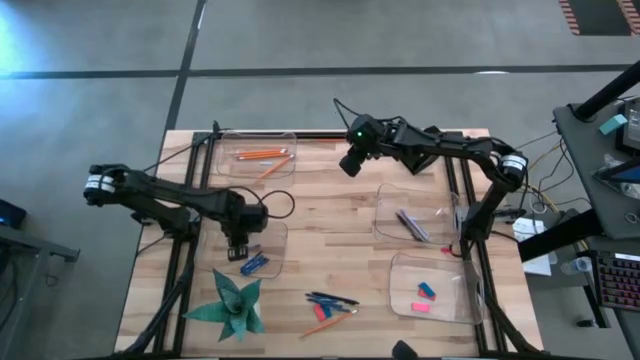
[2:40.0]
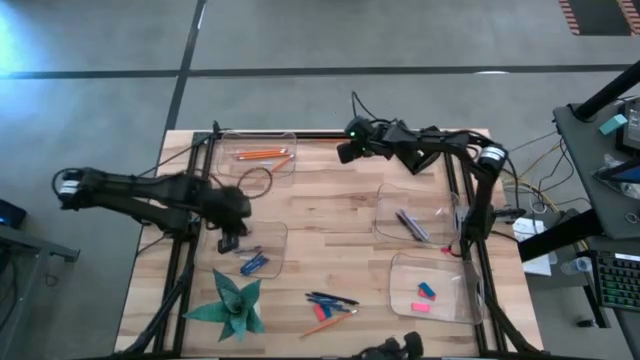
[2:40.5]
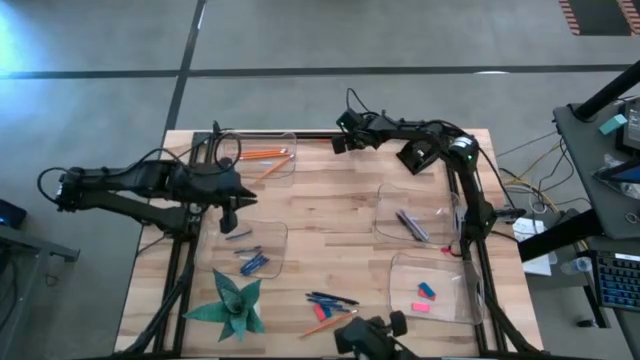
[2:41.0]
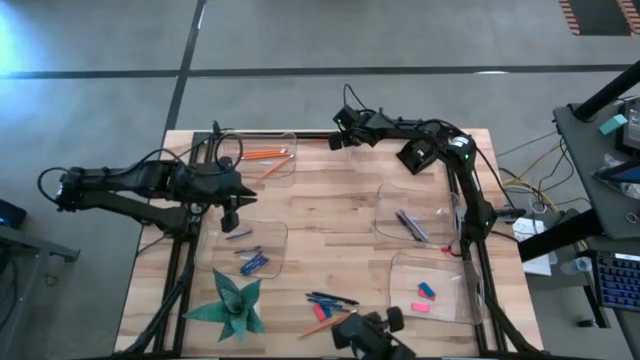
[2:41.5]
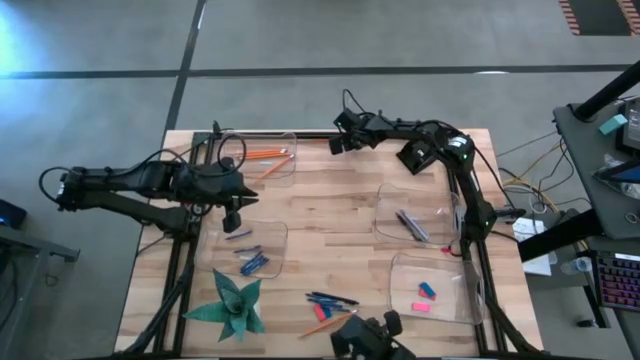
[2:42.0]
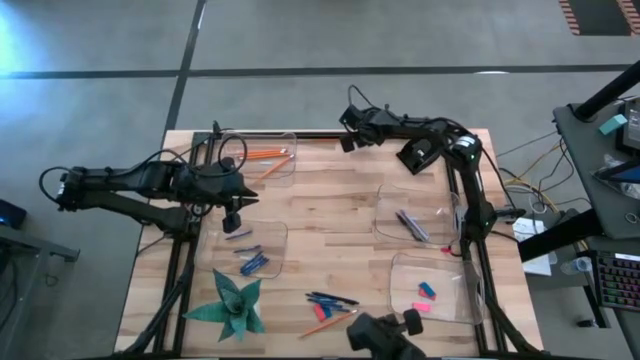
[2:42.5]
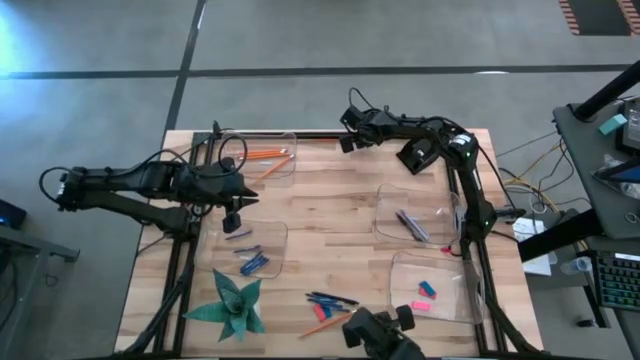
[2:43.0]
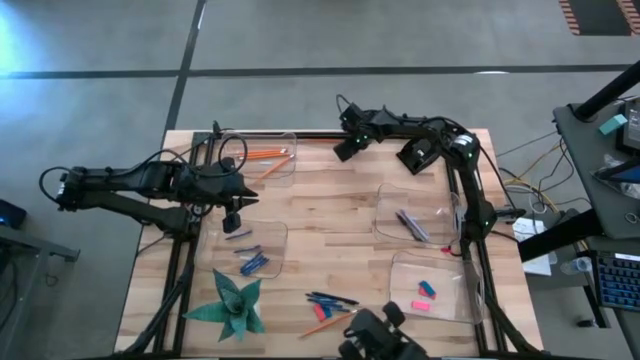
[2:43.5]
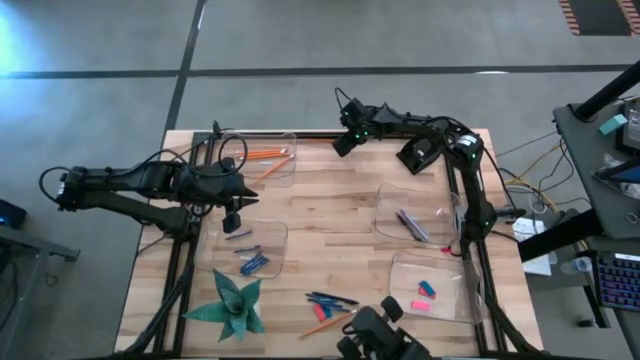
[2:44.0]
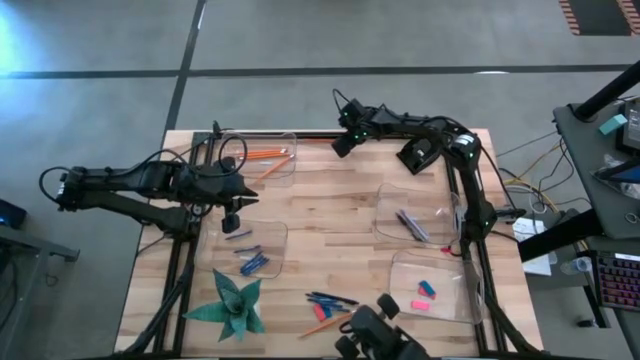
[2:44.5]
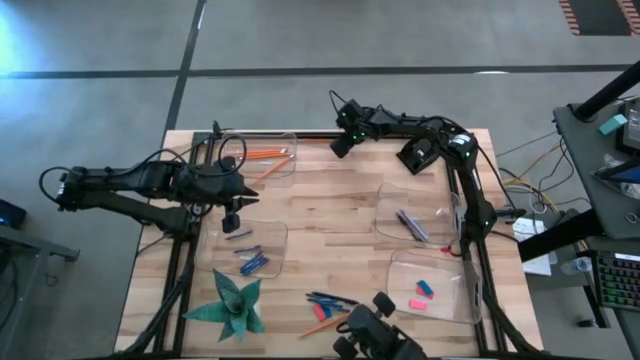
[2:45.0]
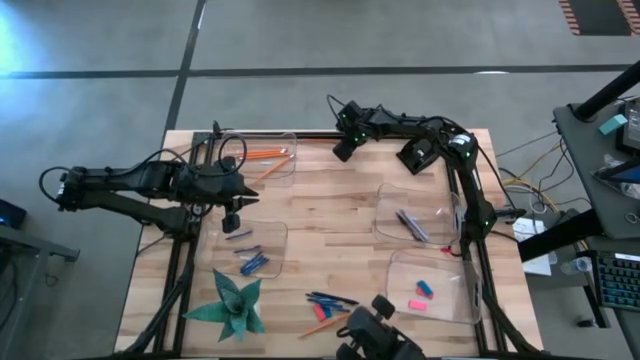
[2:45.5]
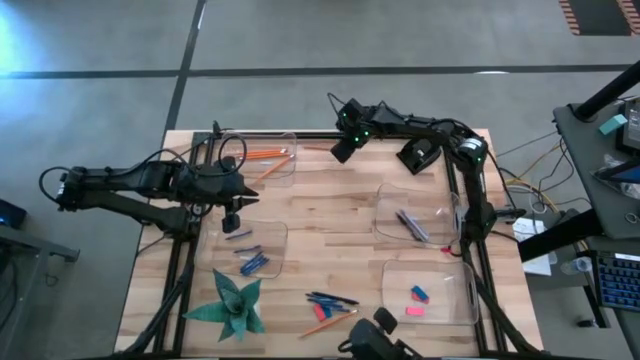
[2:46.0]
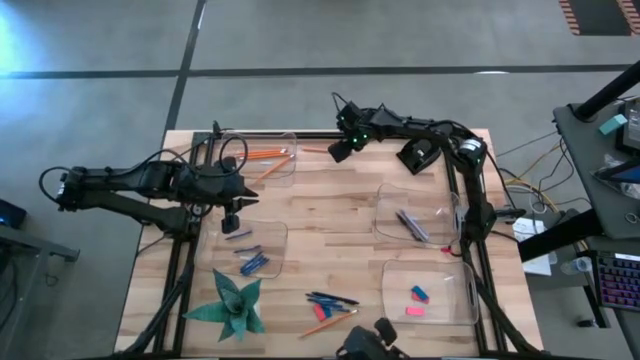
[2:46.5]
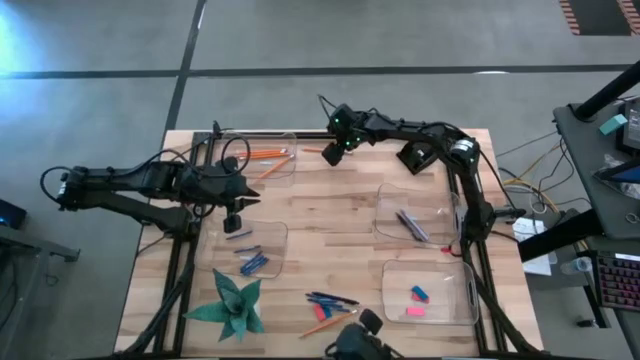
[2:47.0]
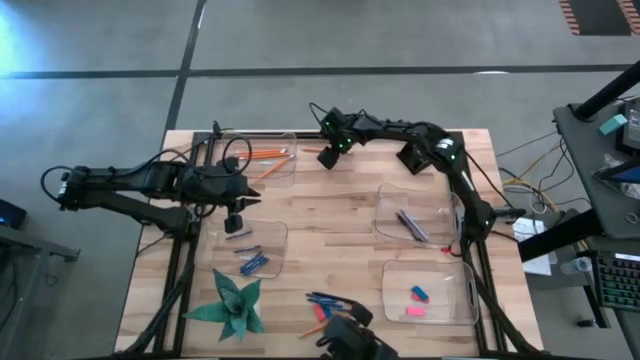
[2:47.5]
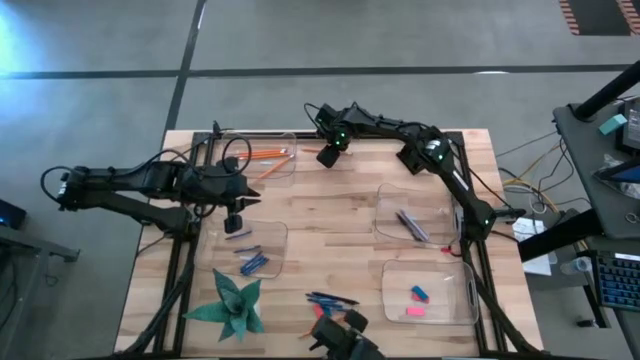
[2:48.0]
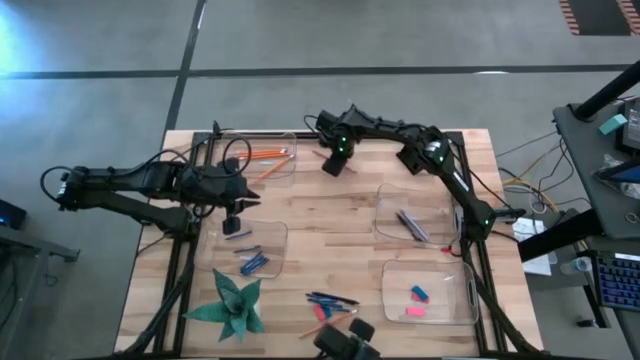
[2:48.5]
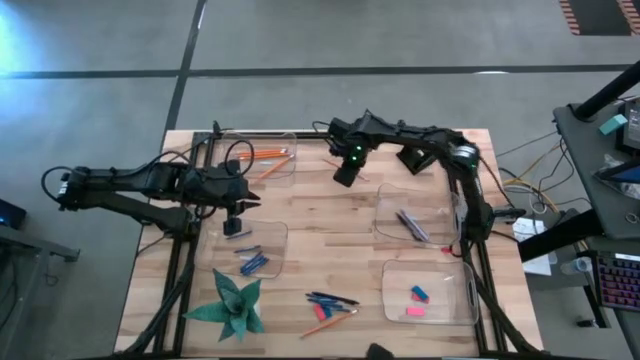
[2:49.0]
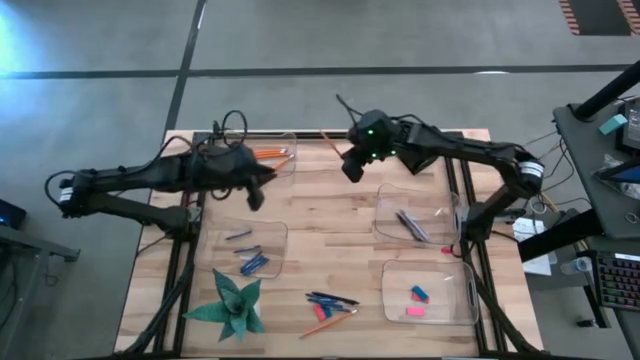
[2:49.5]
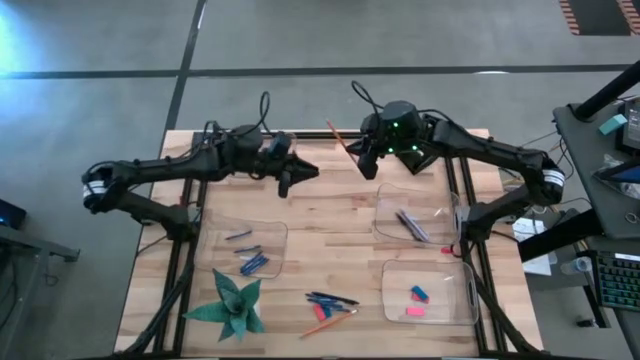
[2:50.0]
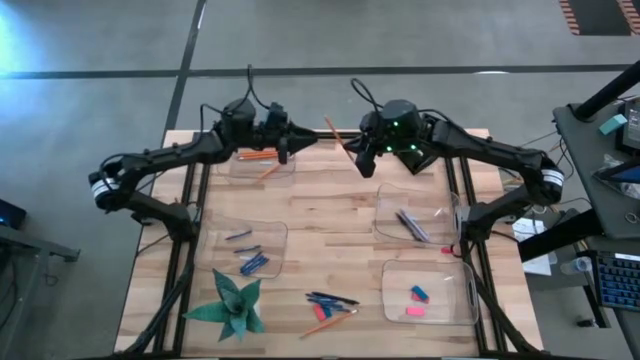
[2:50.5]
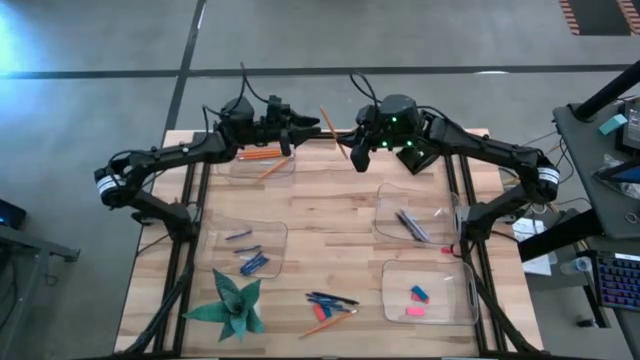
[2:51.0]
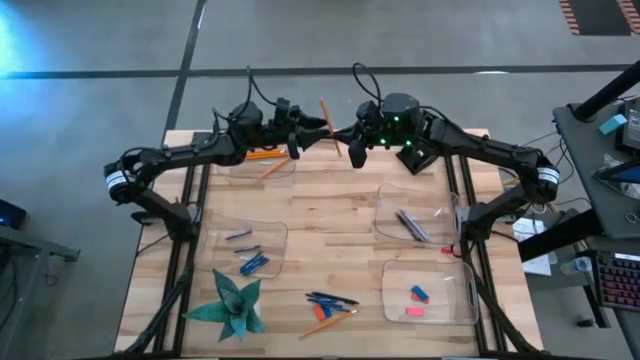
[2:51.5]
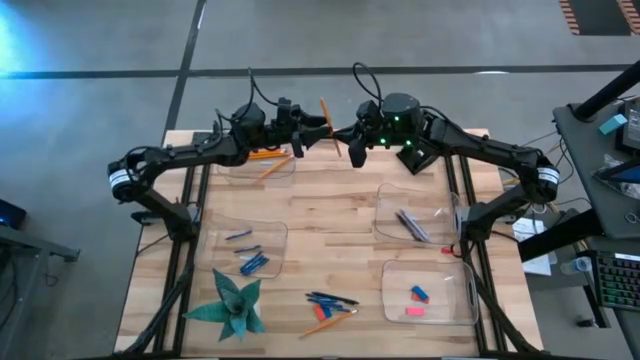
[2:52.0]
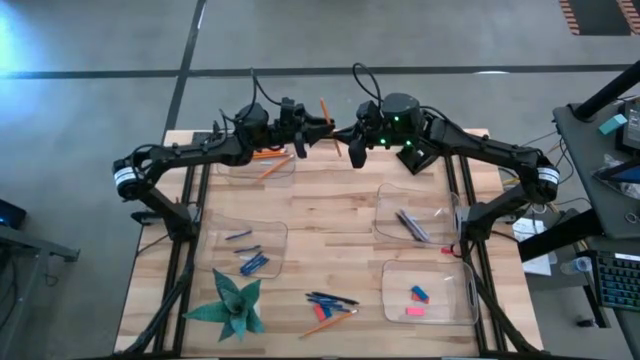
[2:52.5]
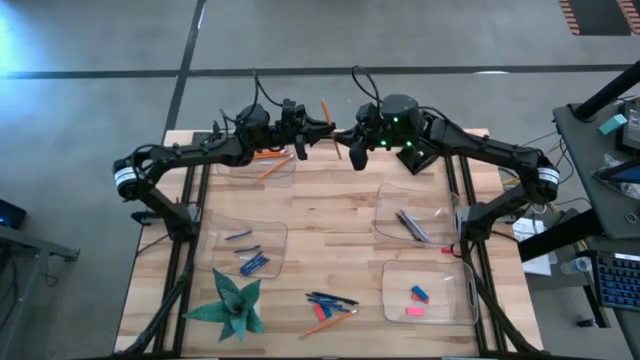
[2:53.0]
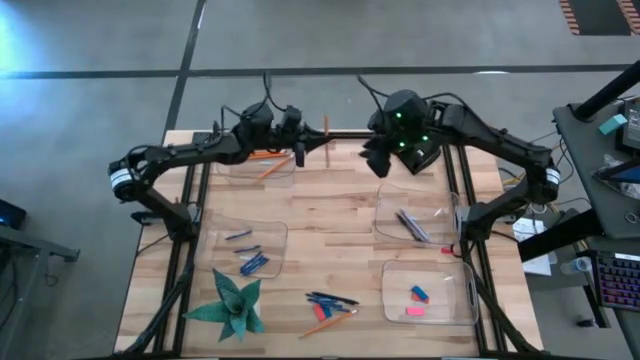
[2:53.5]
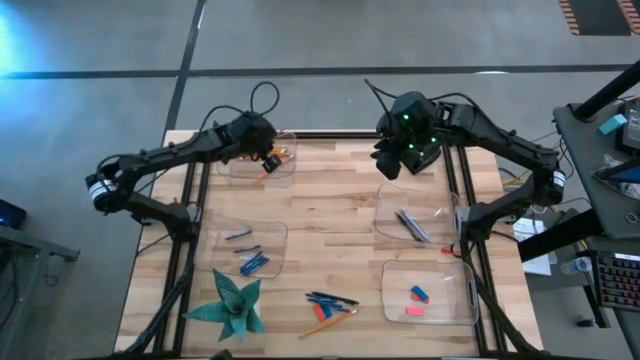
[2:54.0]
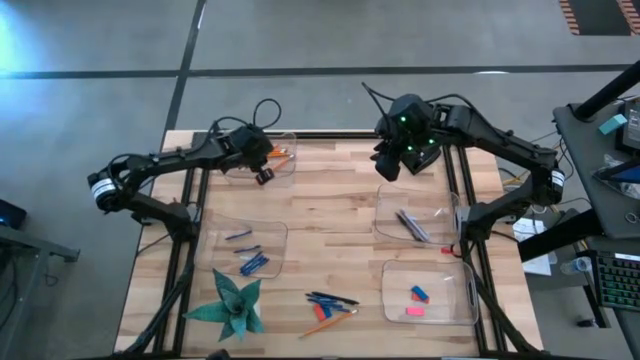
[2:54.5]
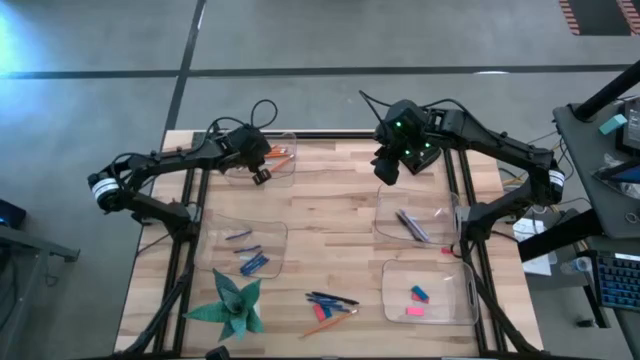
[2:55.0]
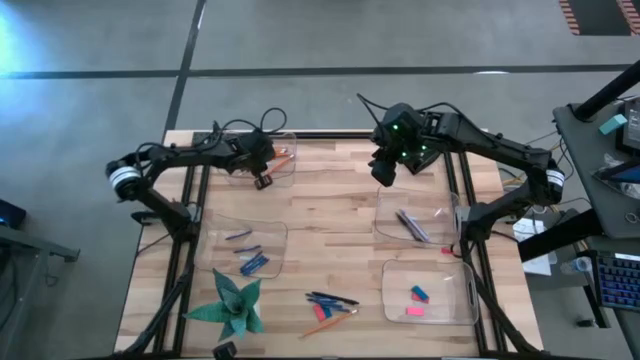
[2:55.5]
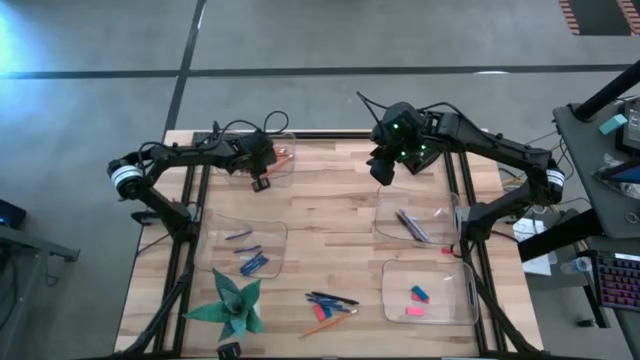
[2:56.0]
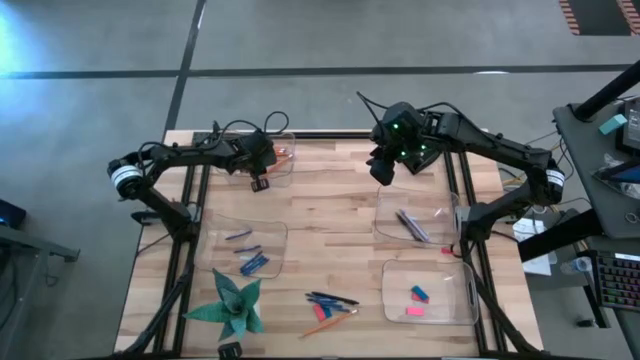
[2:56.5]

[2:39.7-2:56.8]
Task: Sort crayons/erasers/pens/pencils in bins
Put the pencil into the top left transparent bin

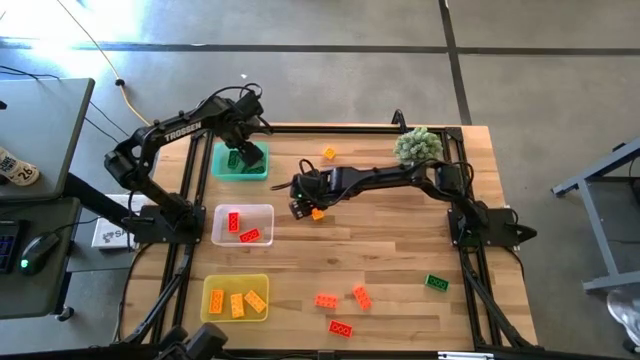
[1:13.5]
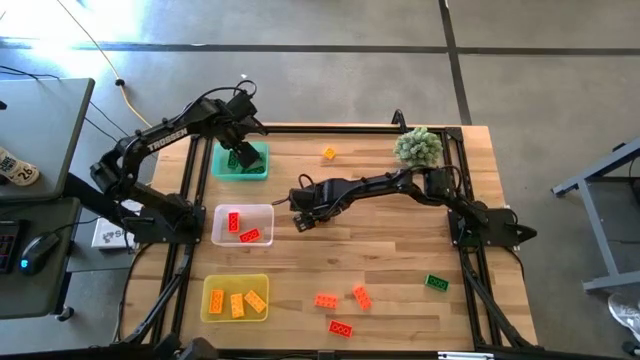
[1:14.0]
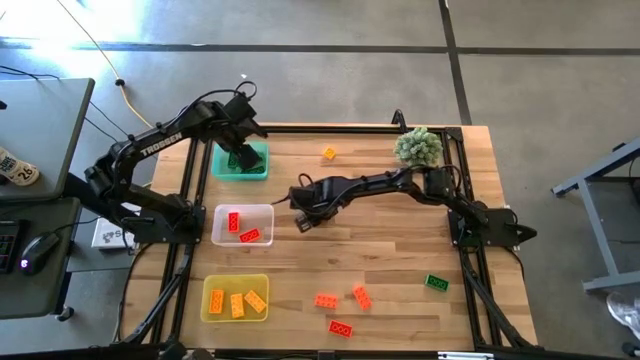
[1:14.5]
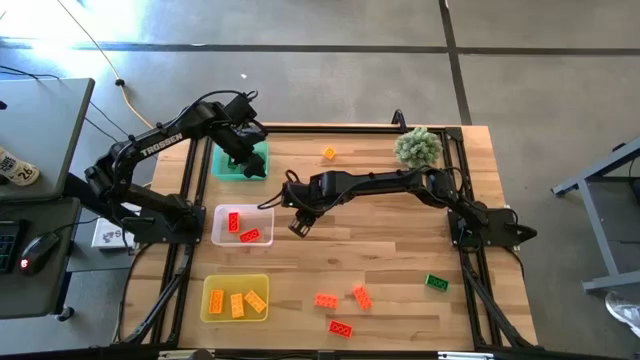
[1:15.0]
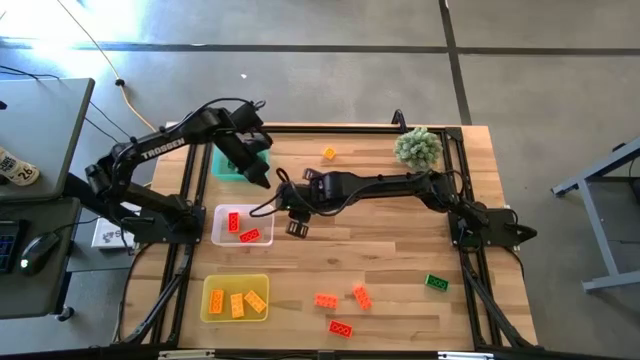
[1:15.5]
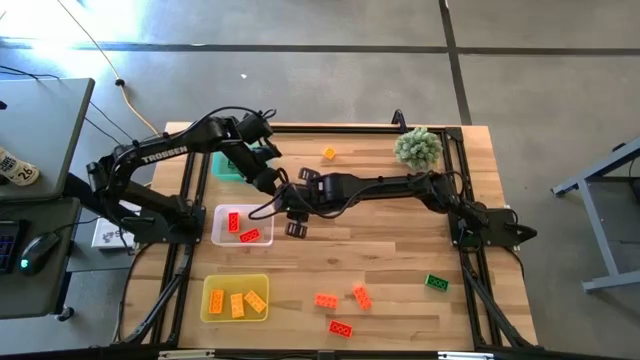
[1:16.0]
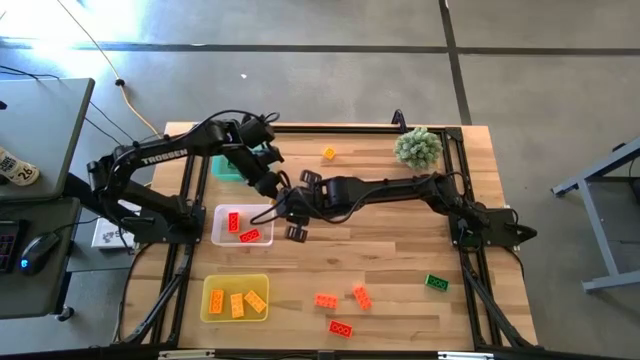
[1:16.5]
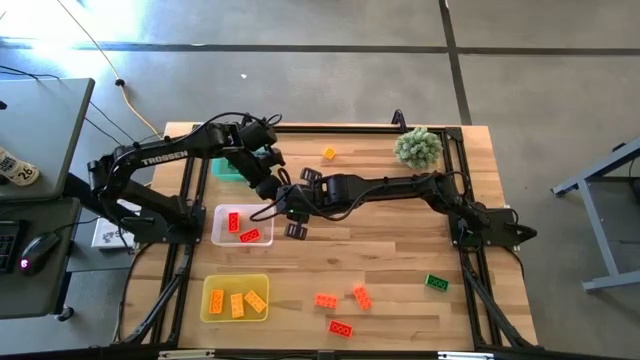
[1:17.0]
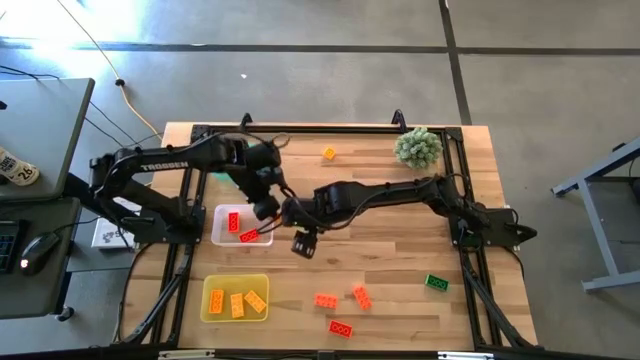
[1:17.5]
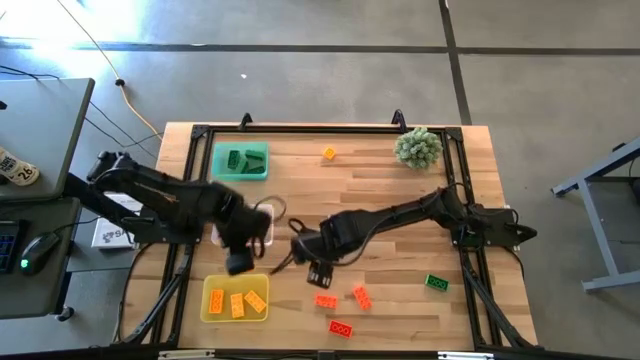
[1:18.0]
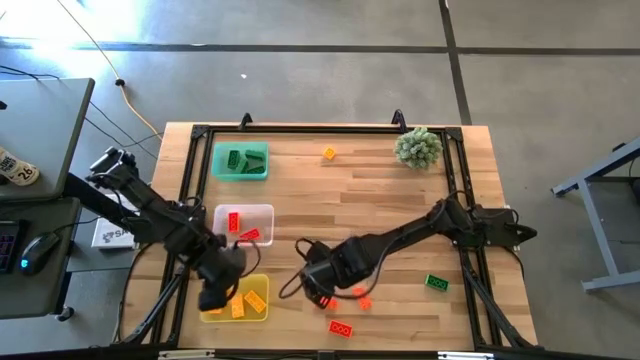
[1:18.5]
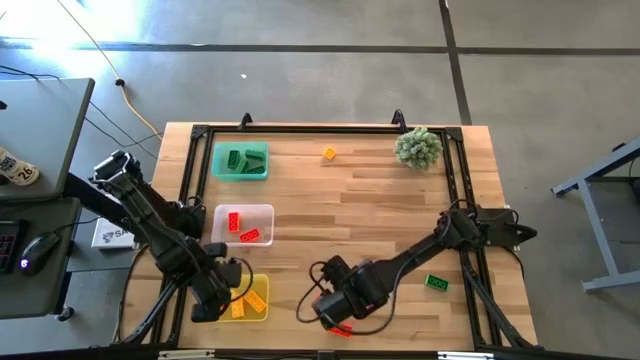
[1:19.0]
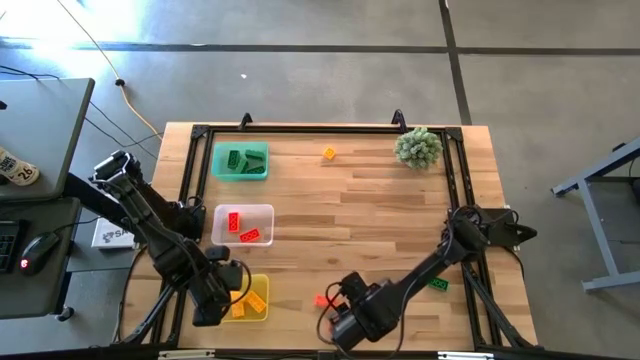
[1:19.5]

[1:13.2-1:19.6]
Task: Sort & place blocks by color
Put the yellow game piece into the yellow bin
